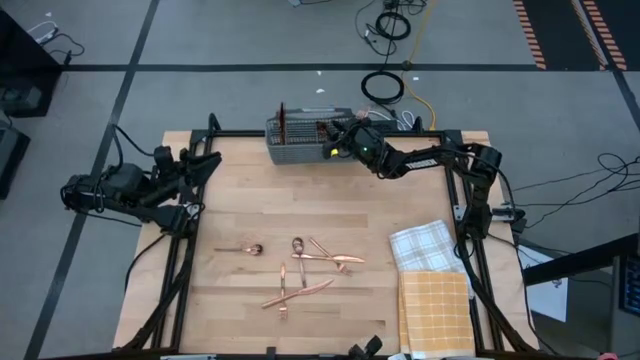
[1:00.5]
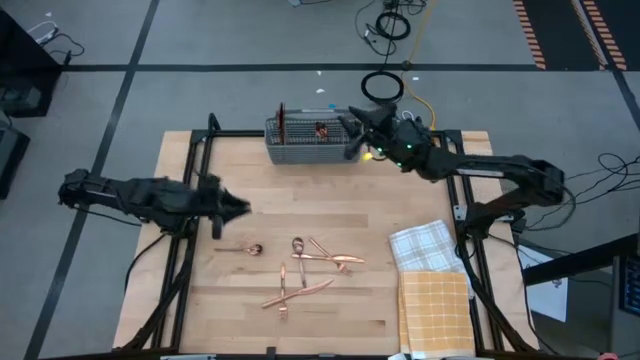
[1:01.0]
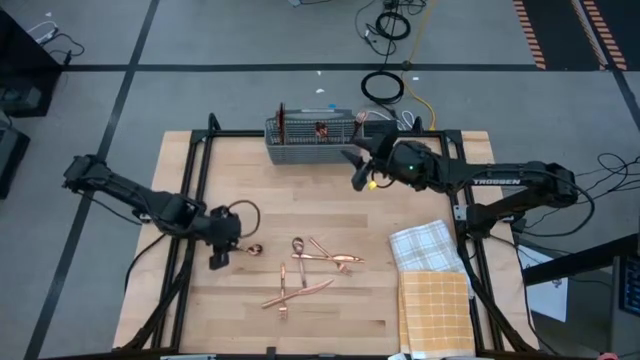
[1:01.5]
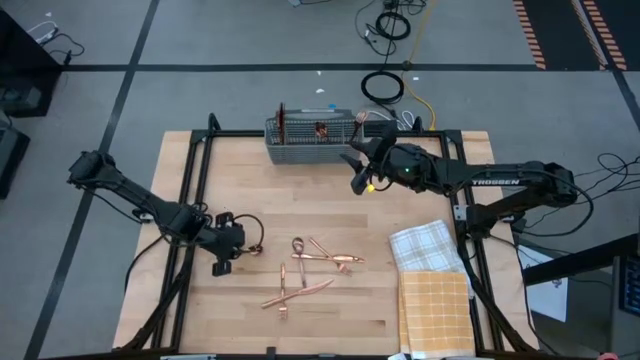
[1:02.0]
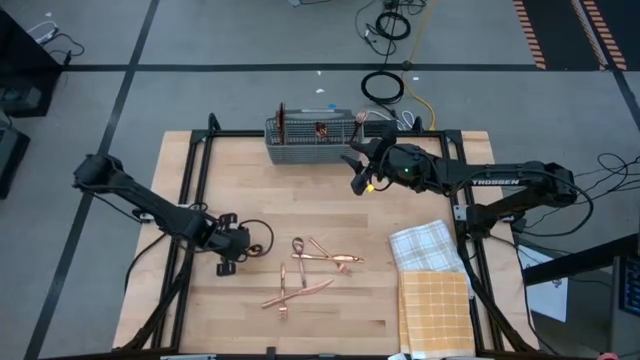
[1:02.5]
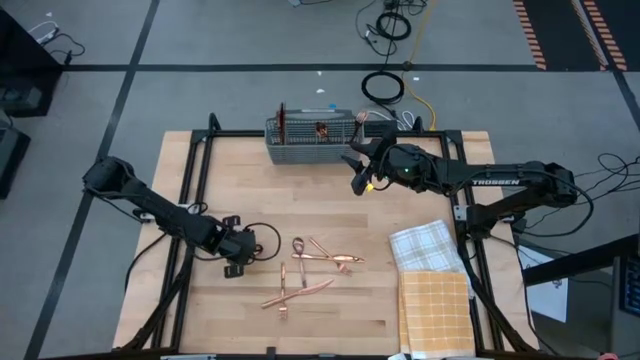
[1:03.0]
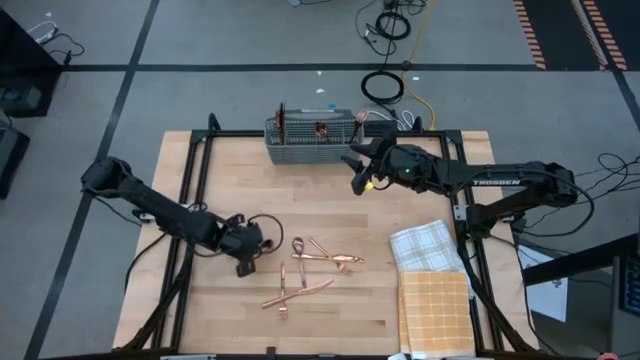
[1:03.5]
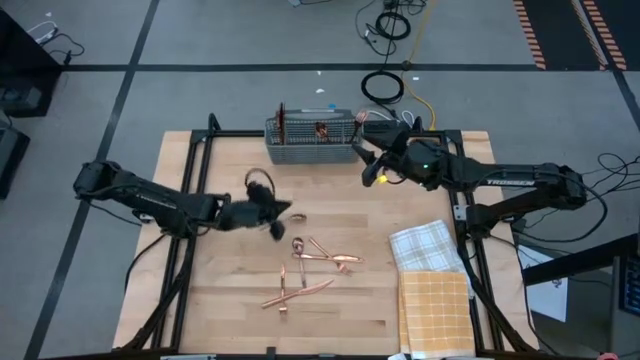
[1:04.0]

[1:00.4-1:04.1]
Task: Sort silverware
Put the left bronze spoon into the gray silverware rack

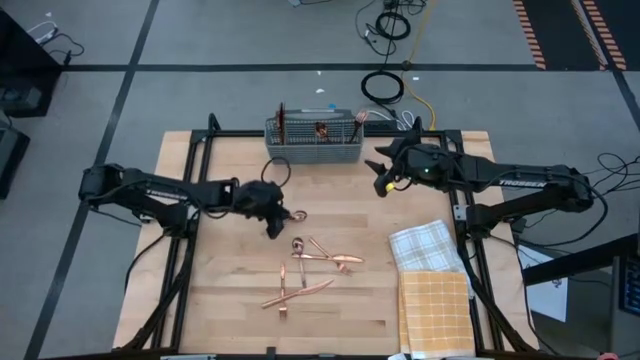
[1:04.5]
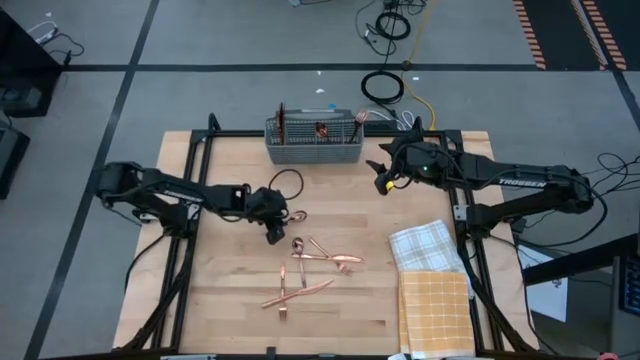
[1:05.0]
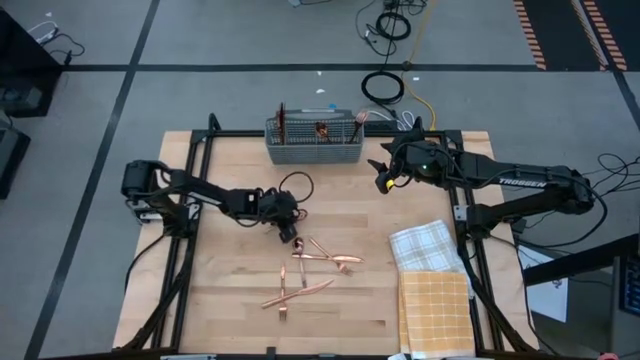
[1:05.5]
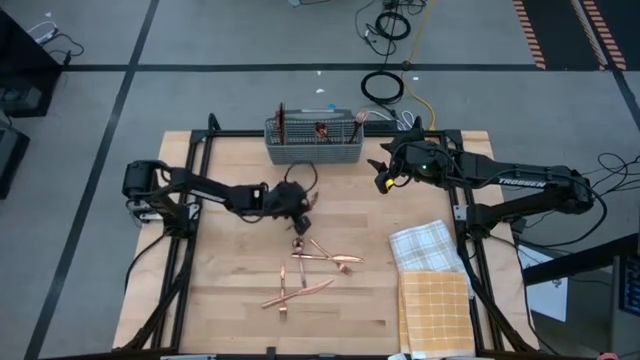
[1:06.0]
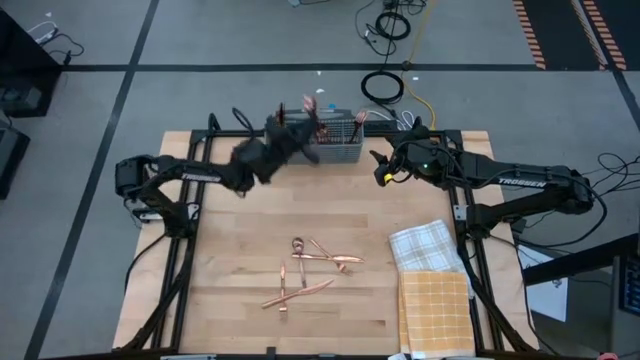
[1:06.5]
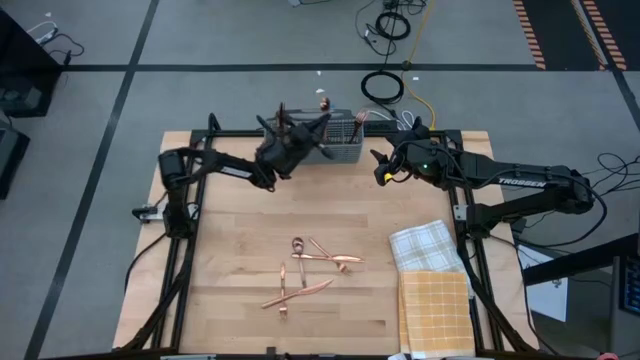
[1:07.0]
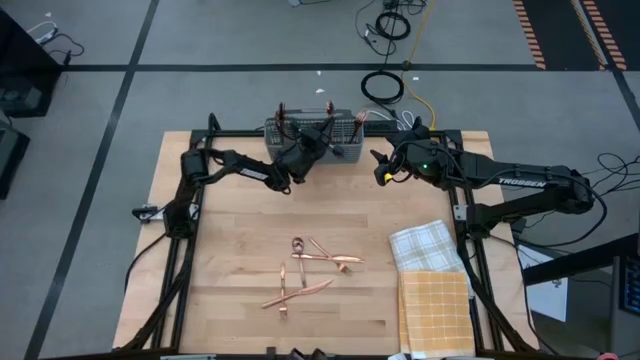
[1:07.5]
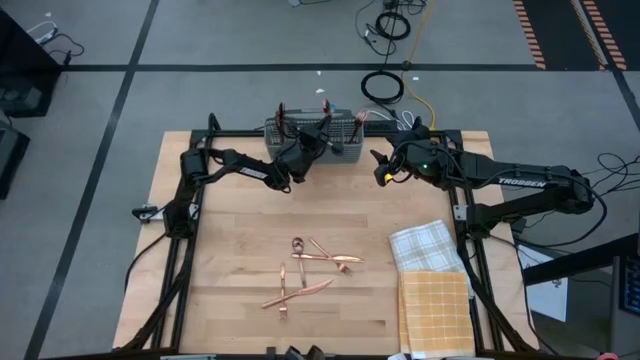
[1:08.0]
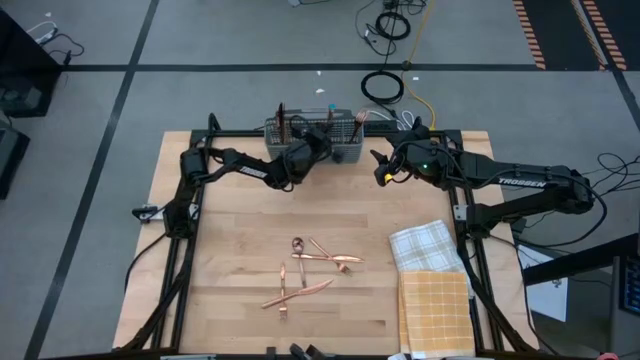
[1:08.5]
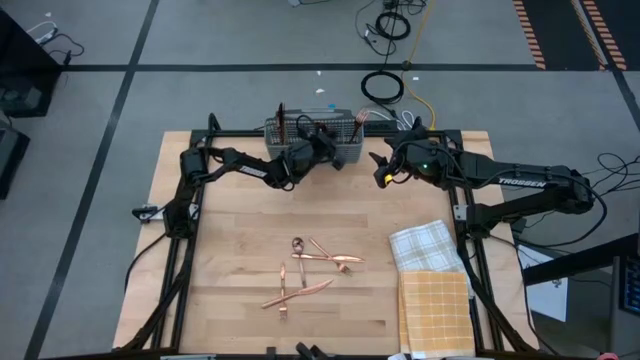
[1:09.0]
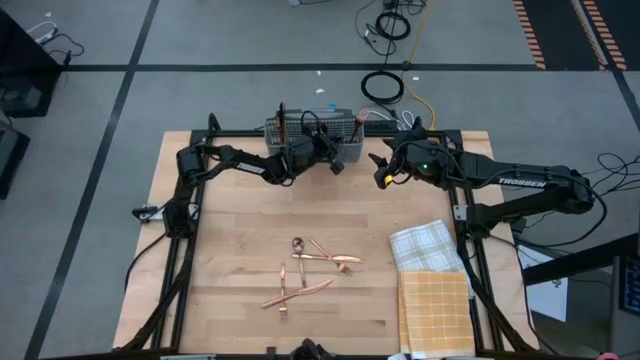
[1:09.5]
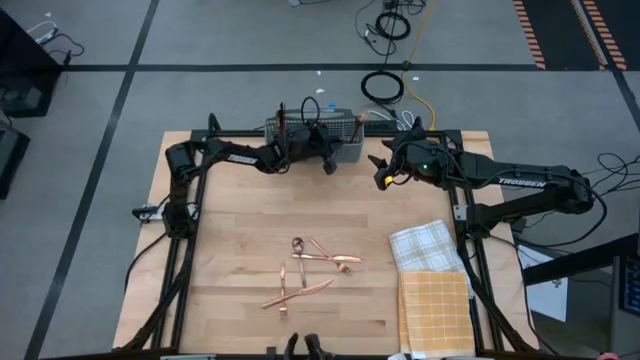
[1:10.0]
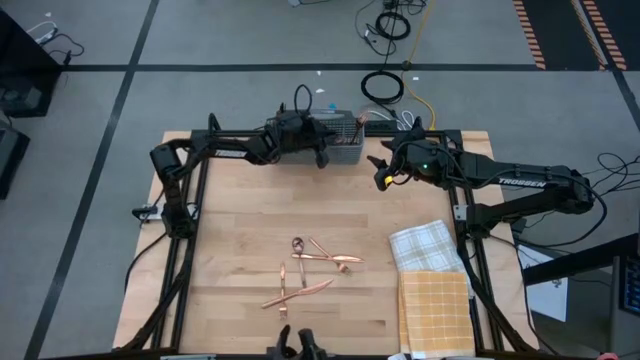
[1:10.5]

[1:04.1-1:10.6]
Put the left bronze spoon into the gray silverware rack

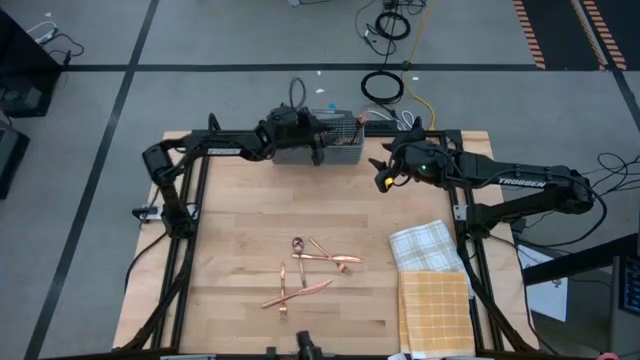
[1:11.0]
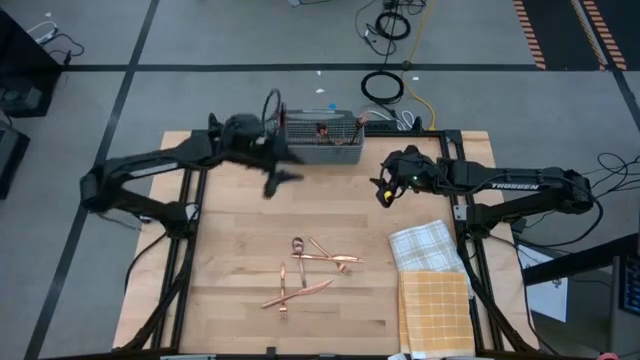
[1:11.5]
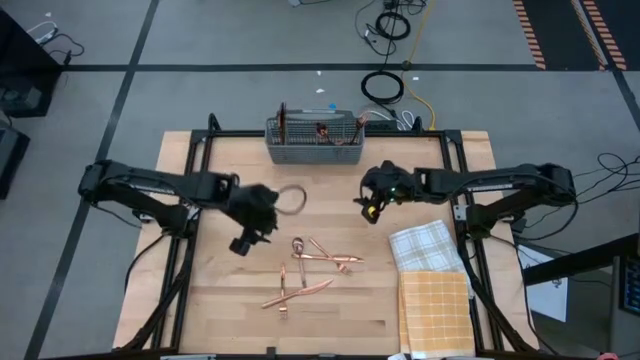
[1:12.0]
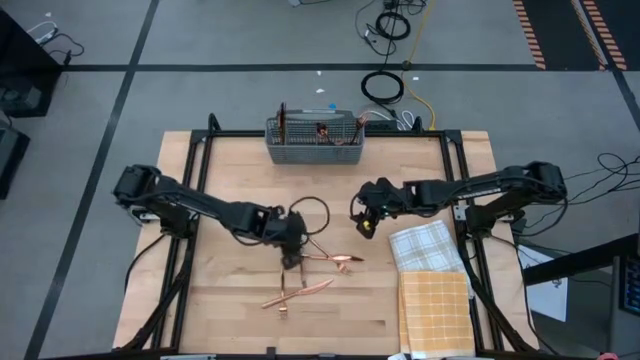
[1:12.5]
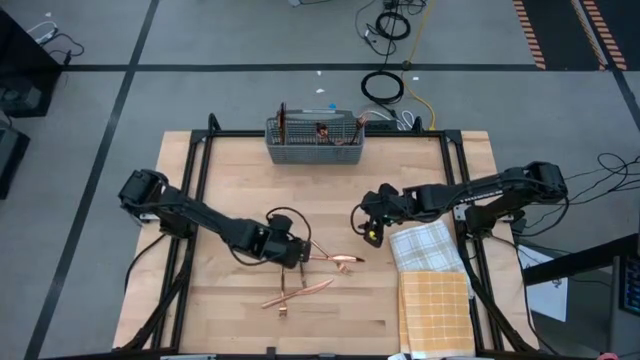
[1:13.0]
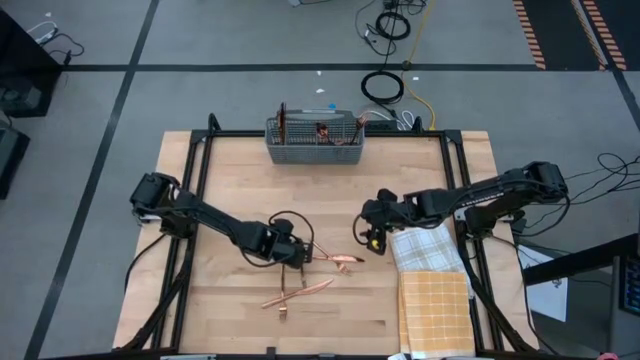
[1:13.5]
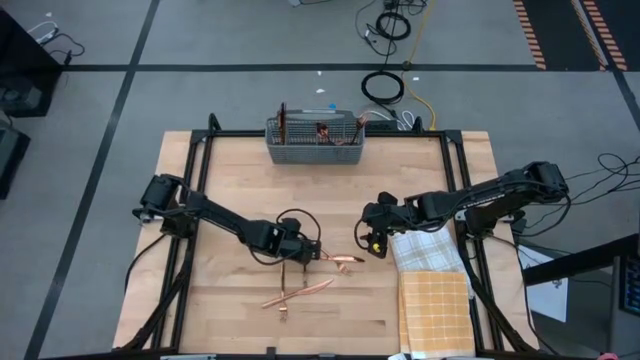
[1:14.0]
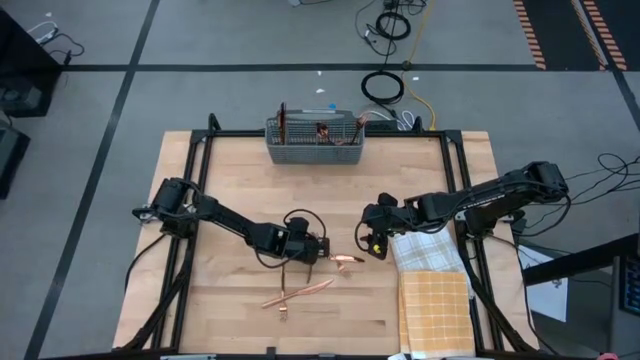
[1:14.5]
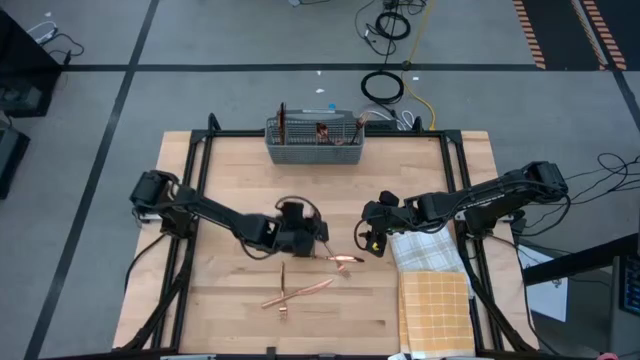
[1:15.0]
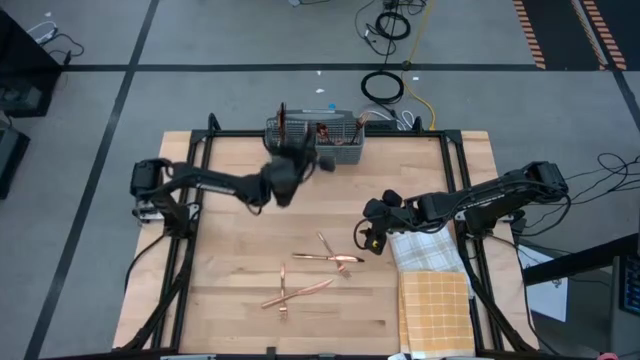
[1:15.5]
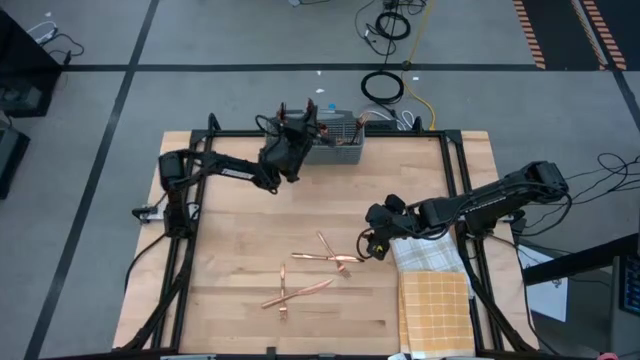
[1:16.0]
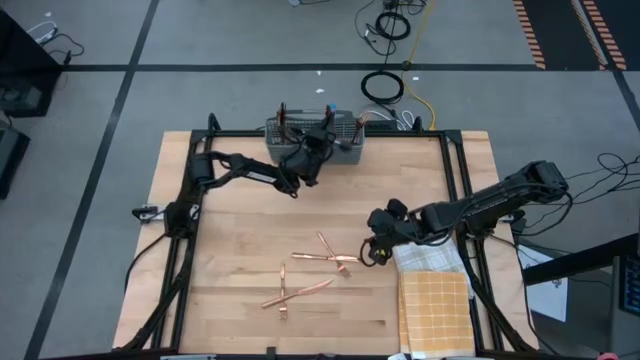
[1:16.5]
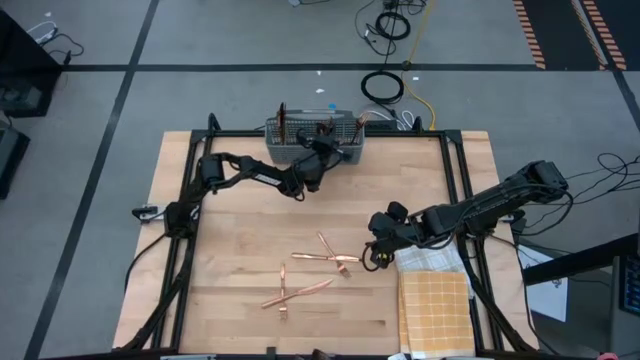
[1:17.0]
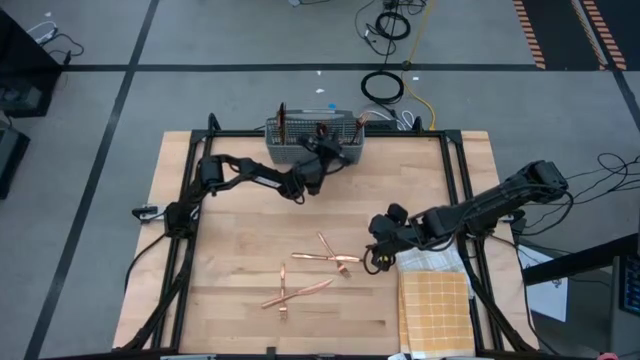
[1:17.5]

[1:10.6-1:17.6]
Put the bronze spoon into the gray silverware rack

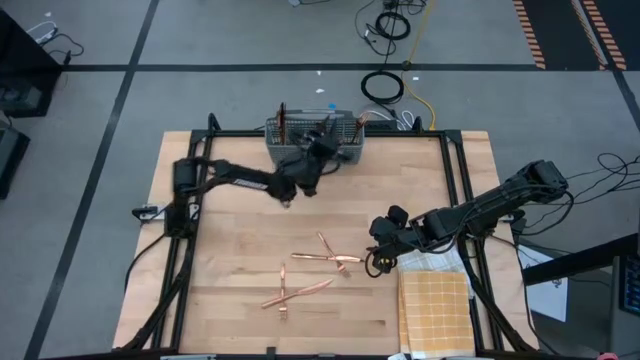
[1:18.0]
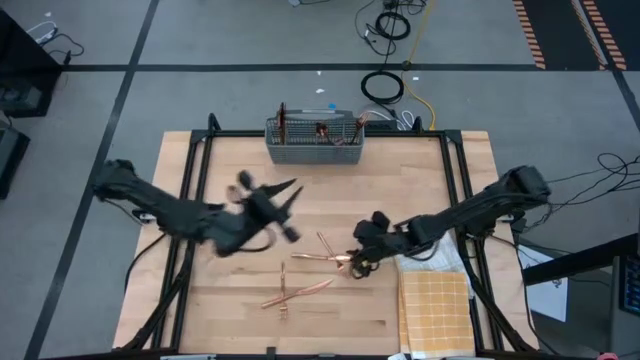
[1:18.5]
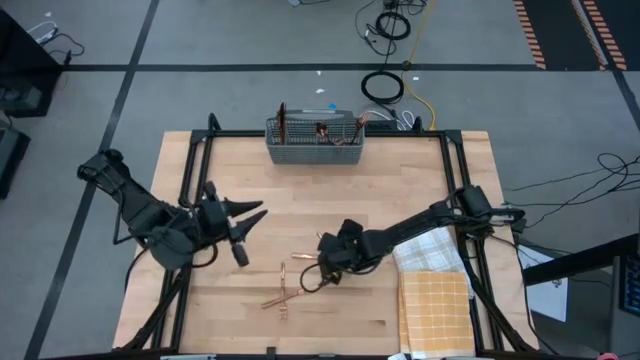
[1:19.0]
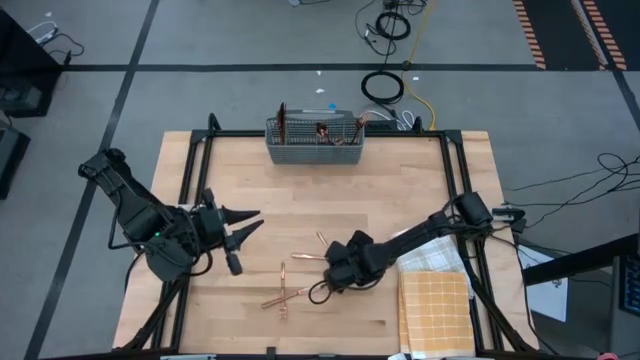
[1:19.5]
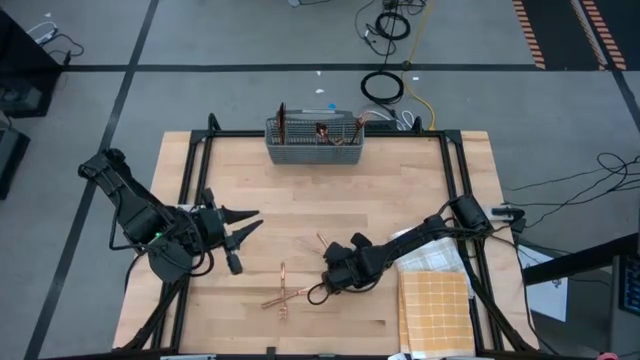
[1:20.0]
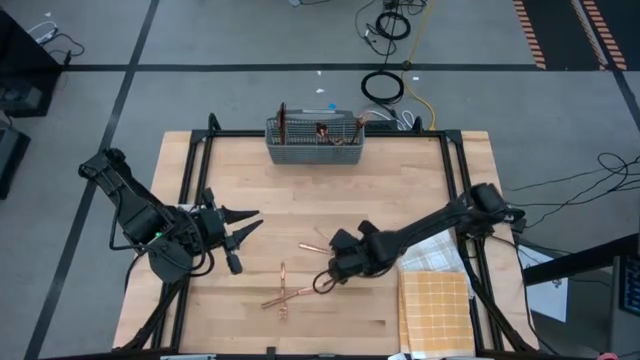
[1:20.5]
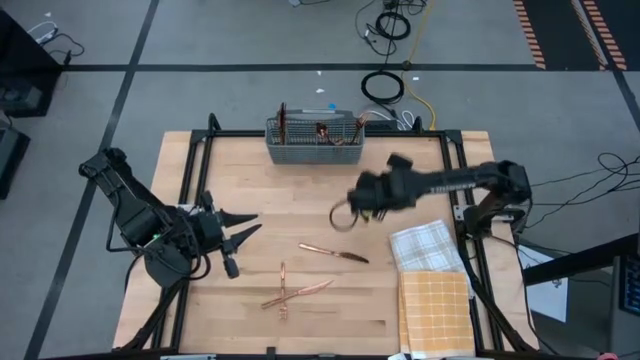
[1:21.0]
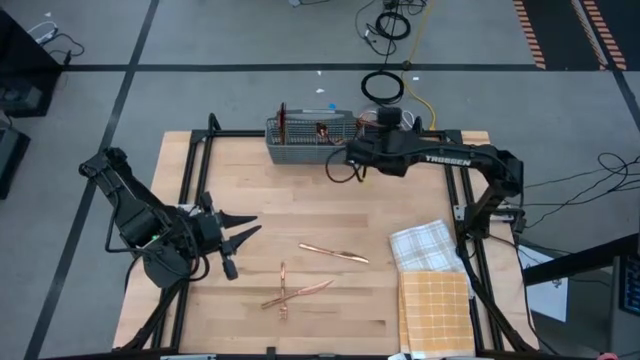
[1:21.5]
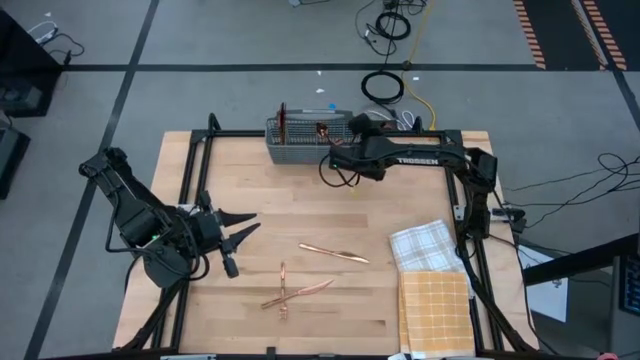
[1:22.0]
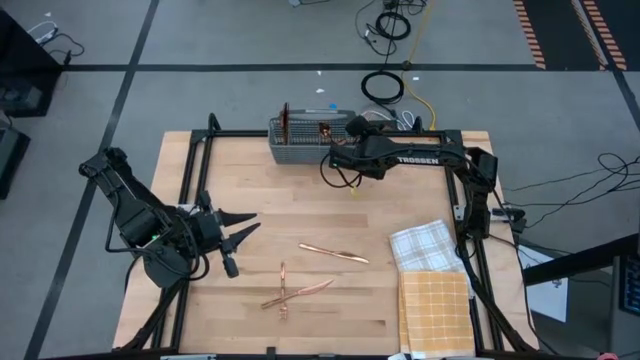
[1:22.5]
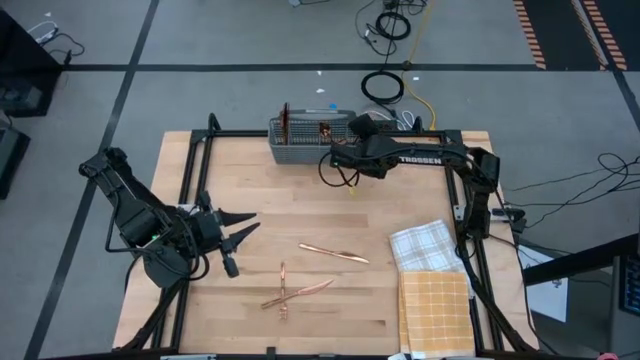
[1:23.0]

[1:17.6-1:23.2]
Put the right bronze fork into the gray silverware rack
